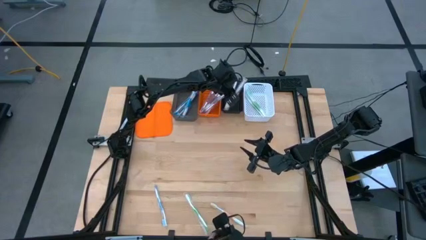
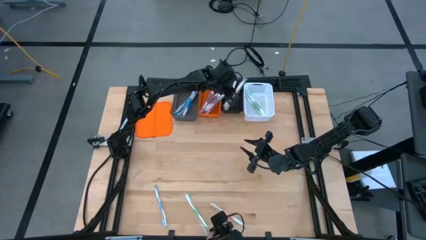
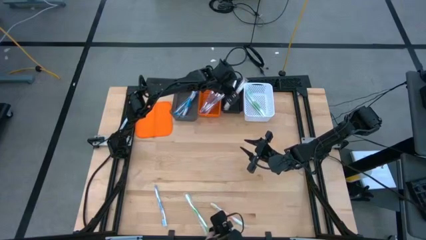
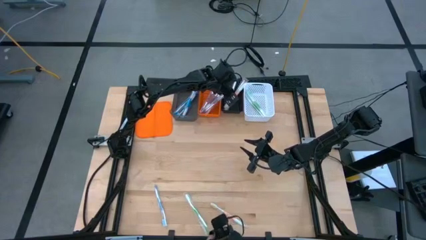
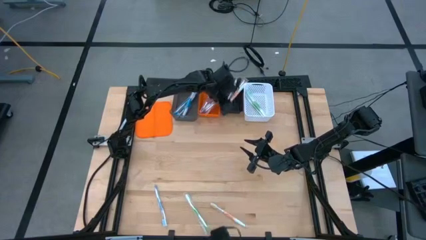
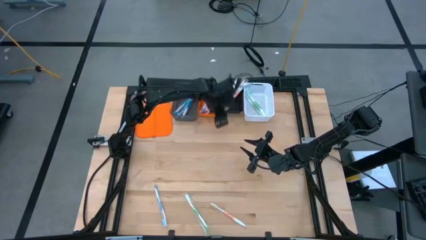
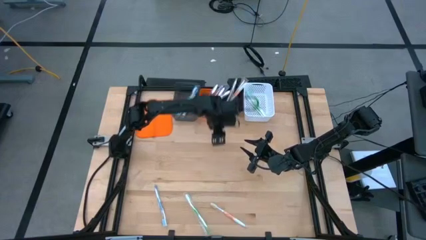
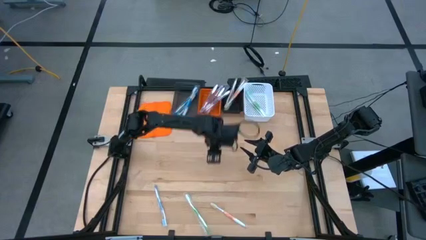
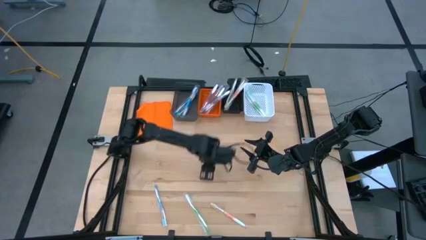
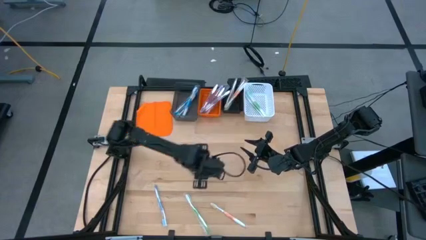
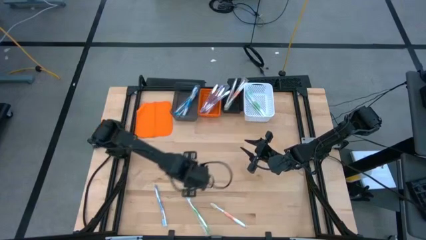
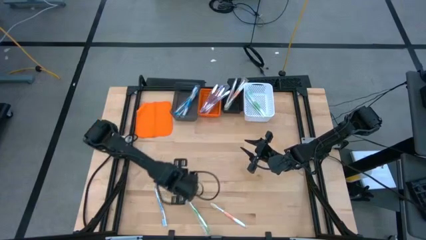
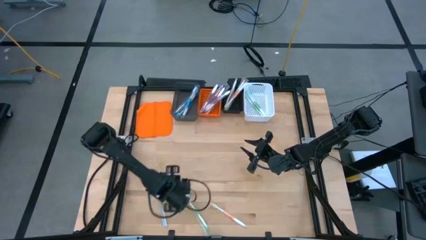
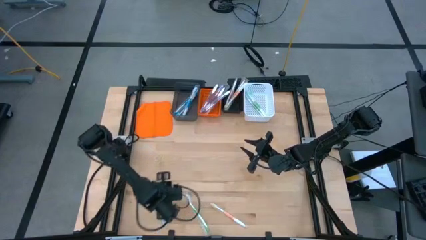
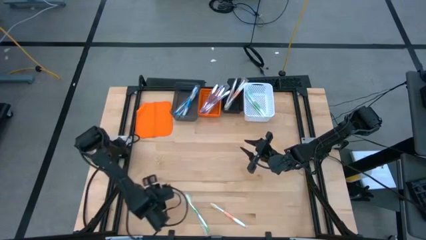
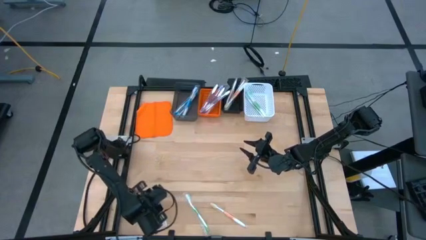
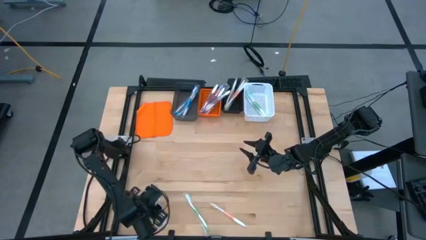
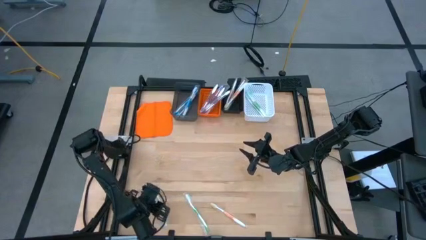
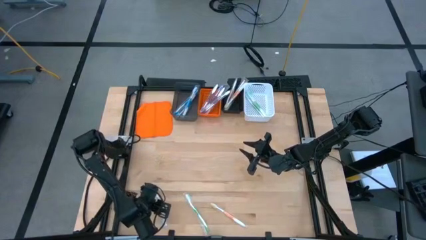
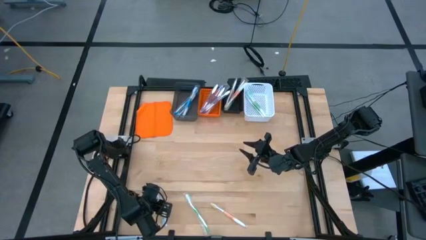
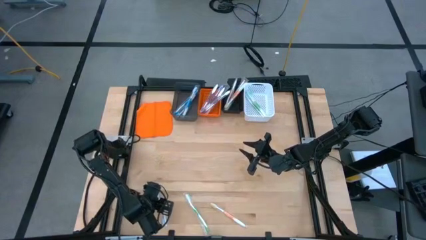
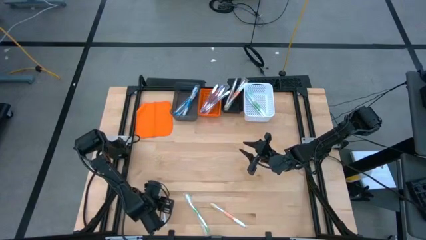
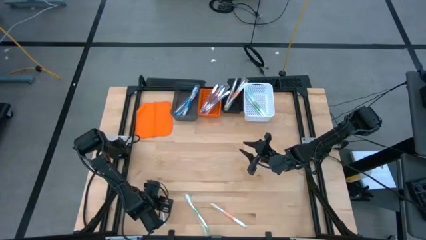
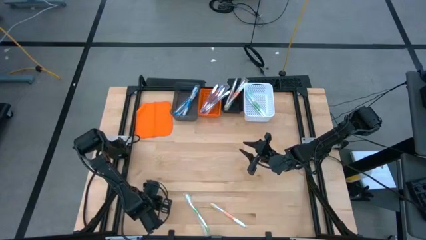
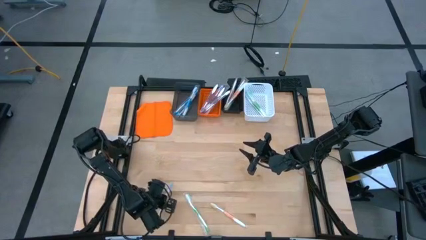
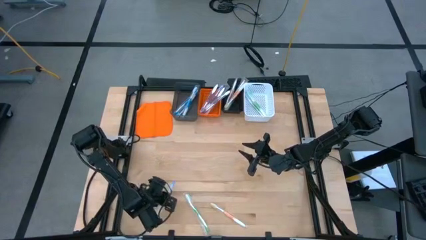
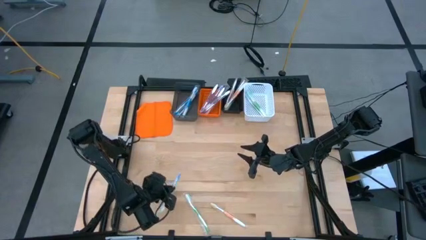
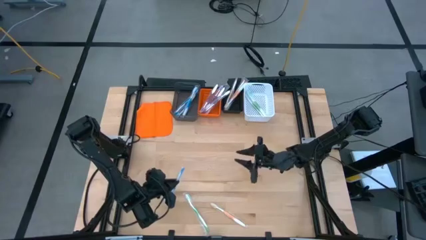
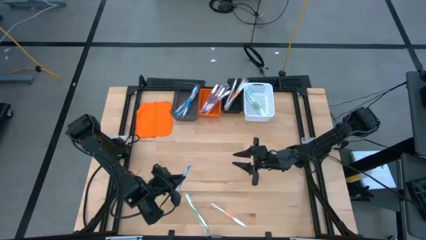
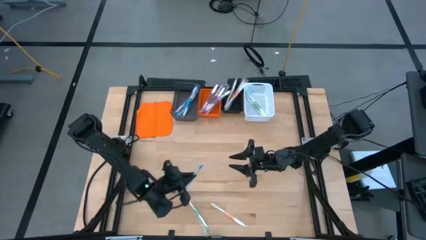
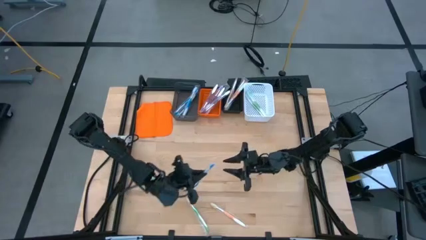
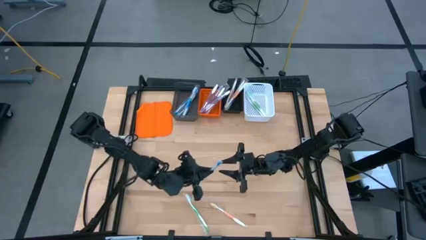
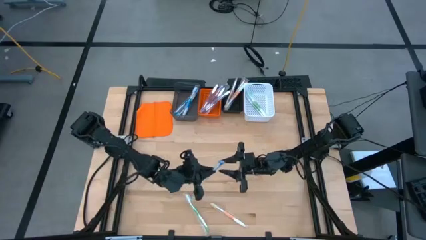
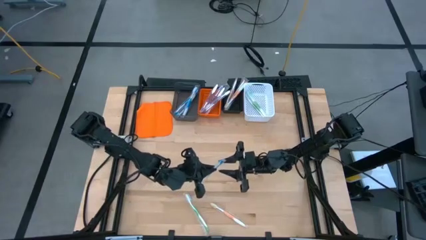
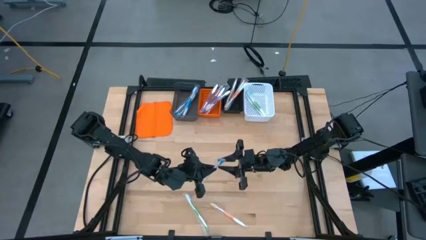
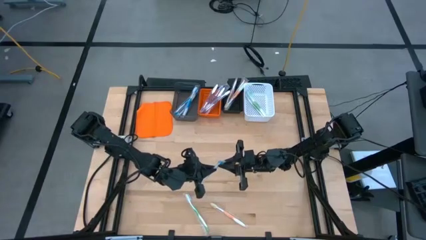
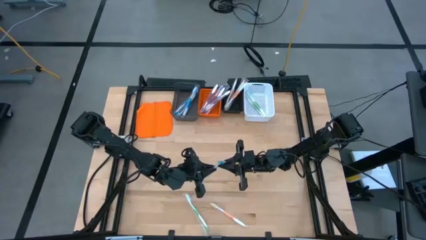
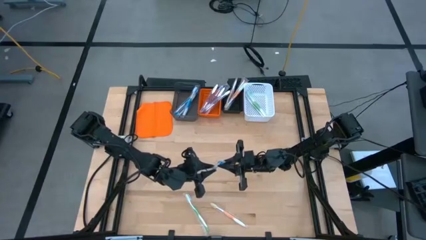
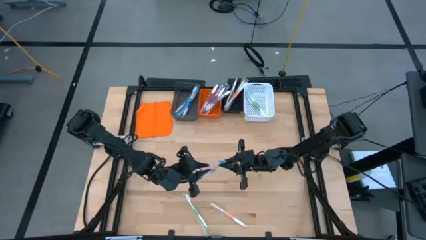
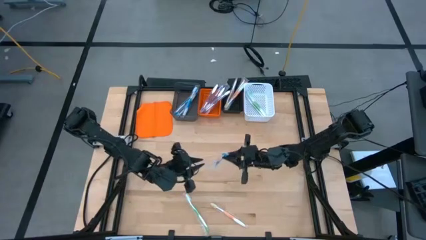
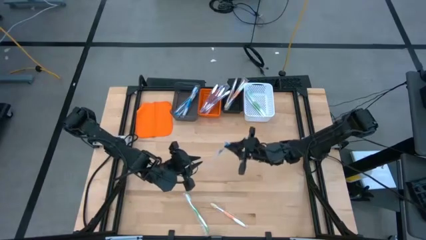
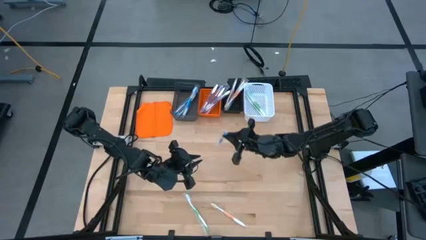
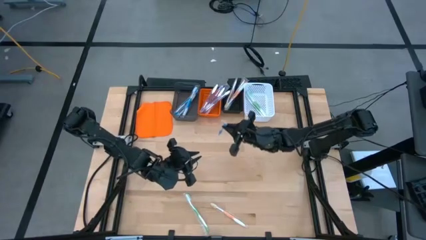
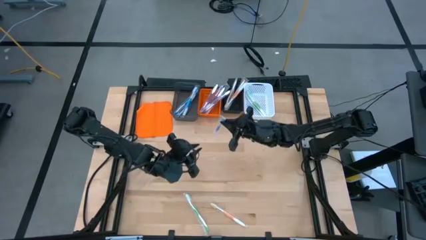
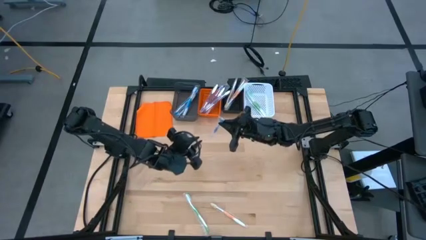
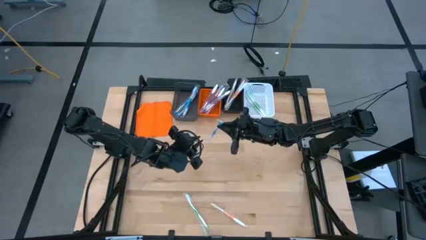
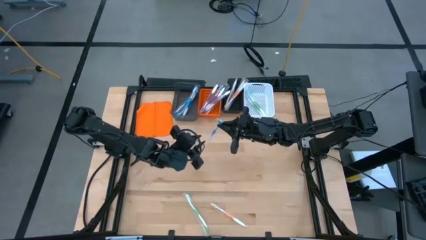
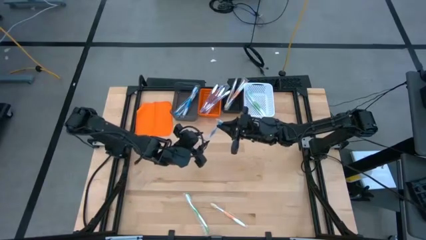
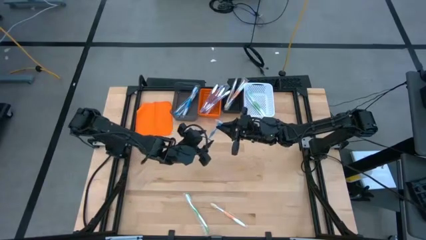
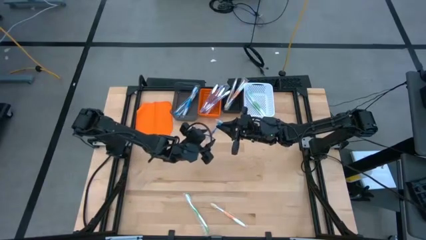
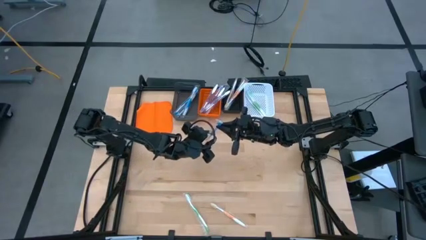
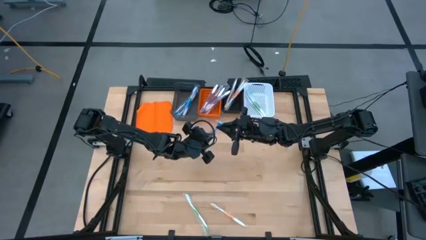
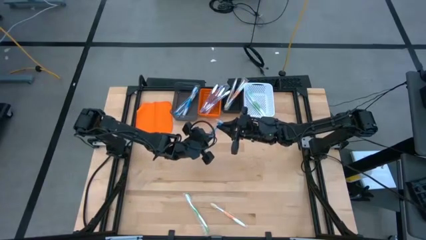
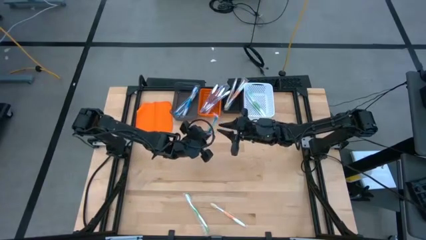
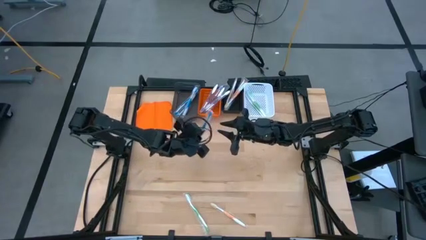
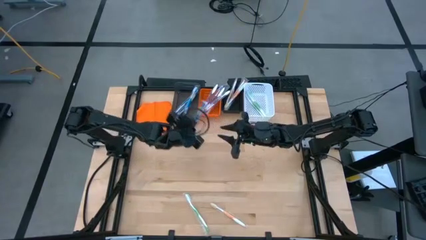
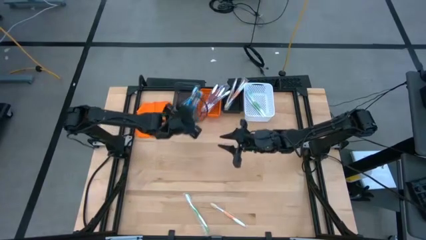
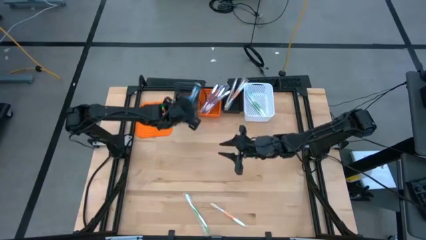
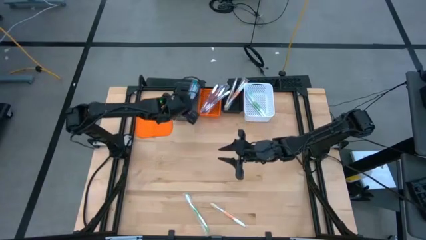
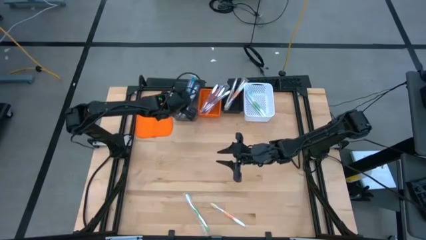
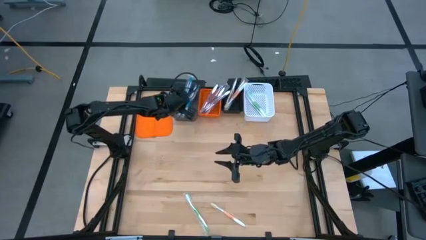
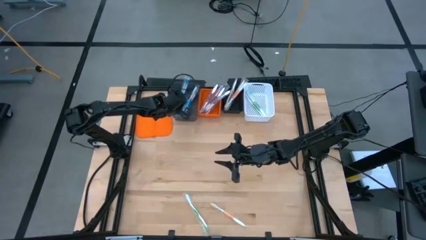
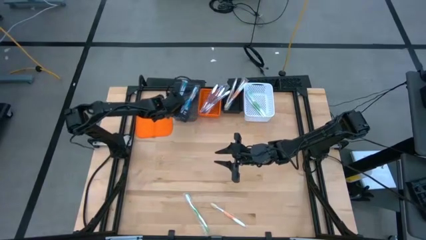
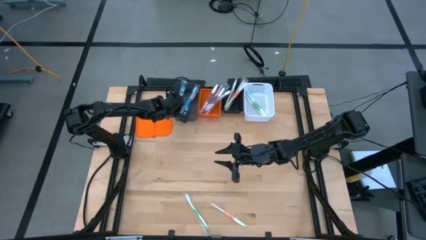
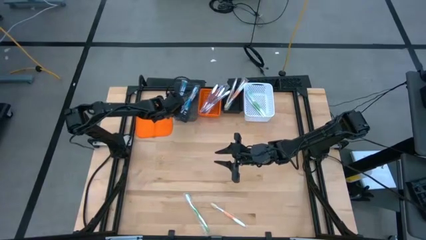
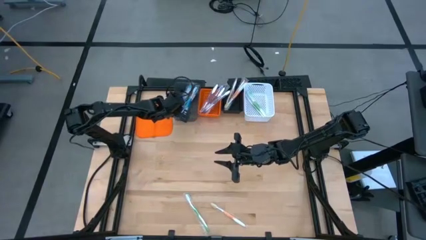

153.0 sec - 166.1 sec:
Task: Pick & Place Toothbrushes
Put the blue toothbrush into the gray bin

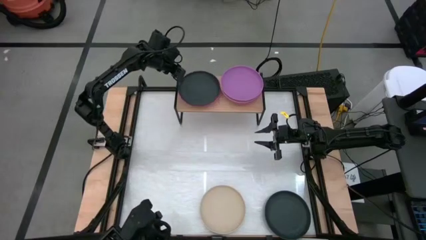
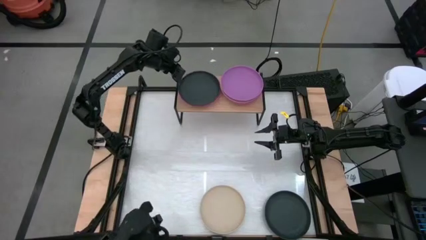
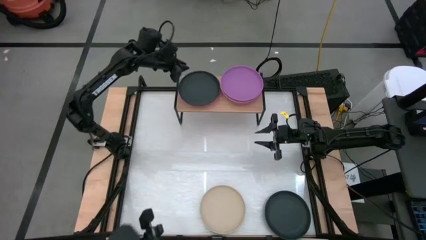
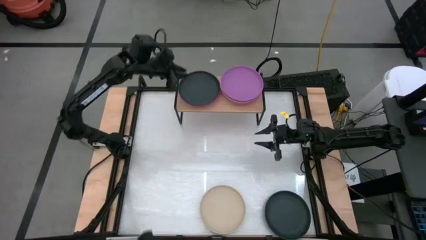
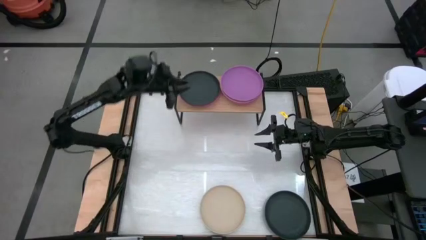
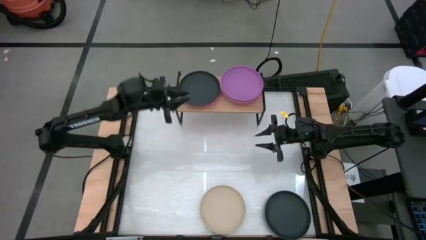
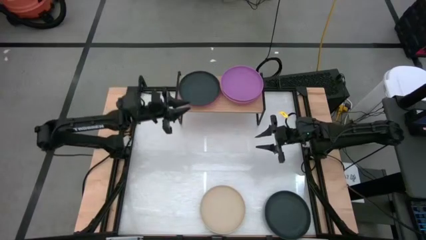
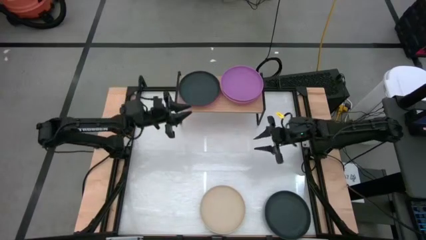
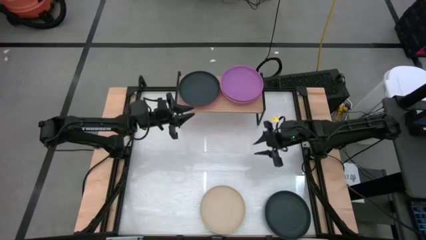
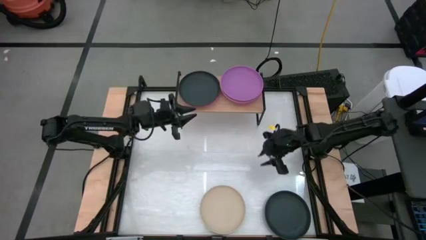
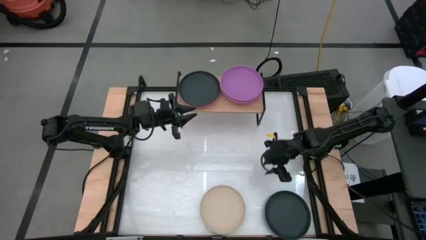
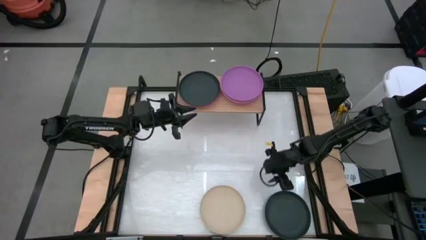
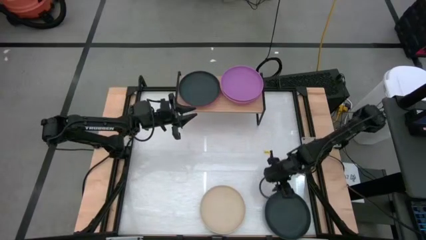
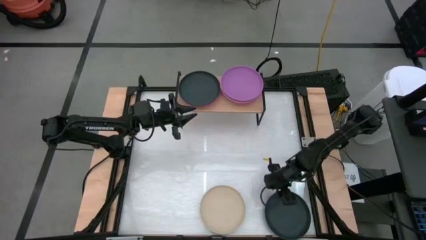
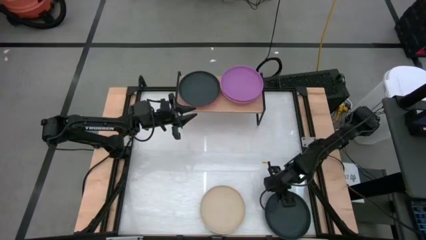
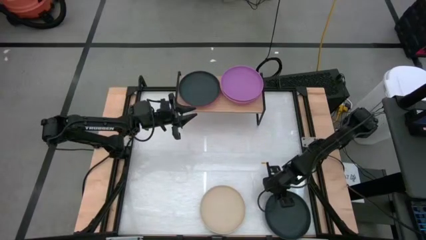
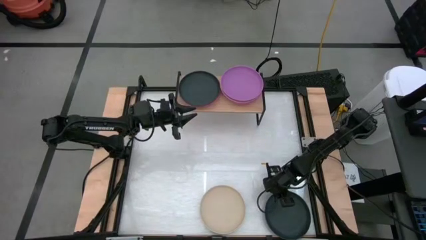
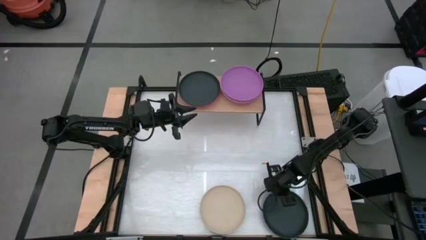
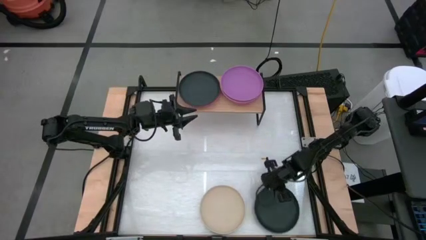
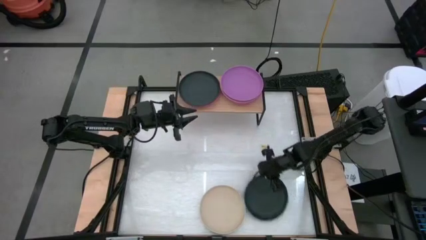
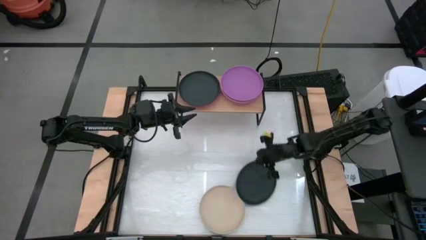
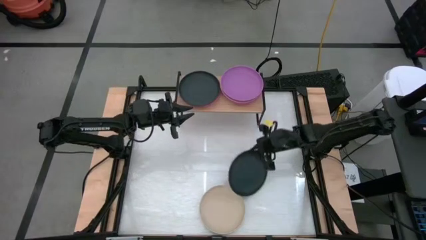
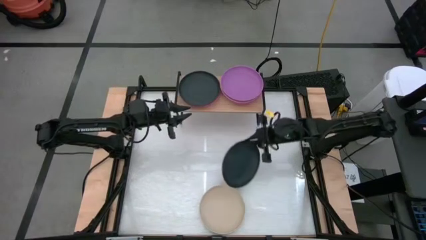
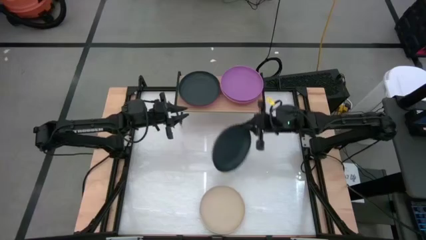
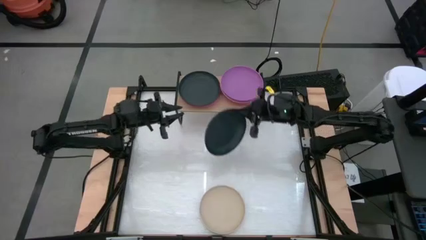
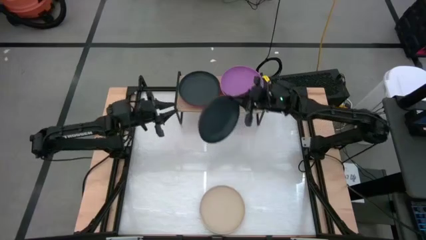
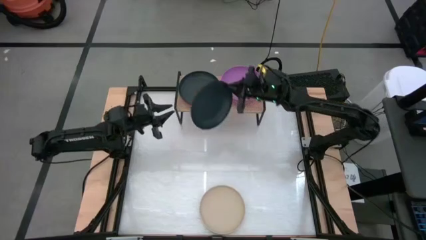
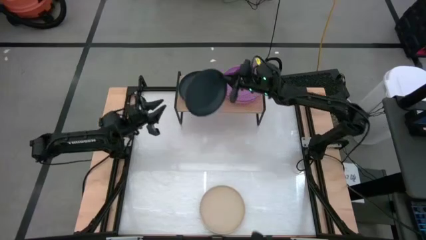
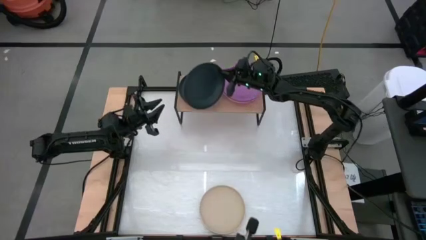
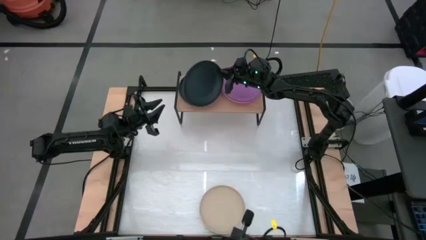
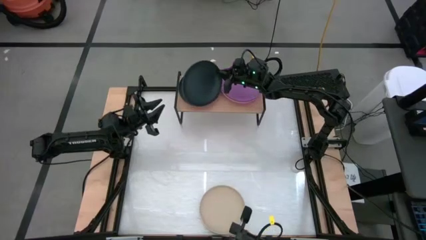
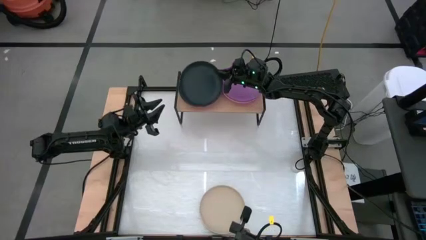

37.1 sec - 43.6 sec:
Task: Place and stack plates onto a shelf
Stack the black plate on the top of the black plate on the shelf
